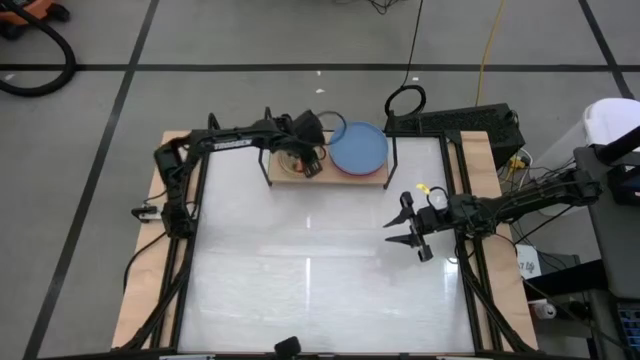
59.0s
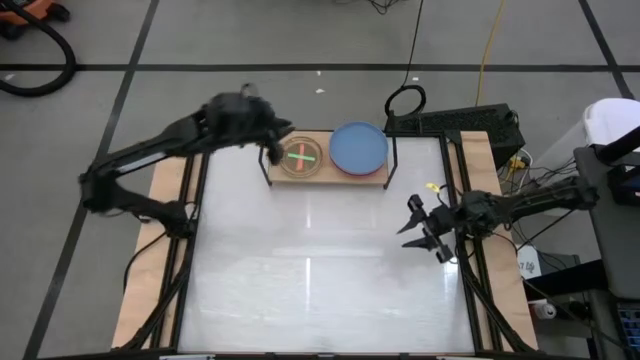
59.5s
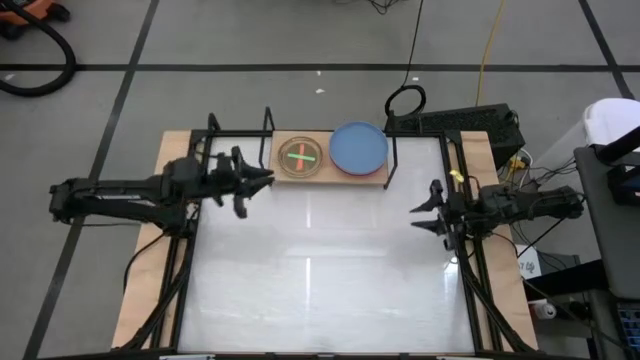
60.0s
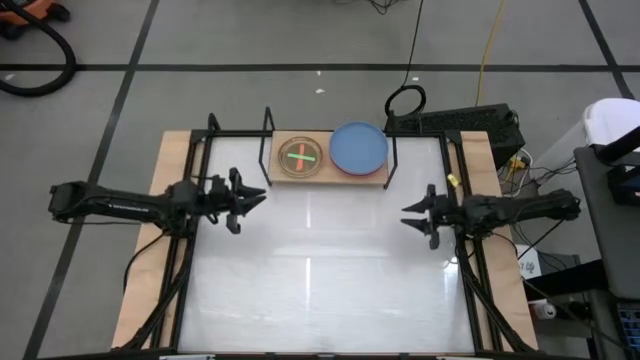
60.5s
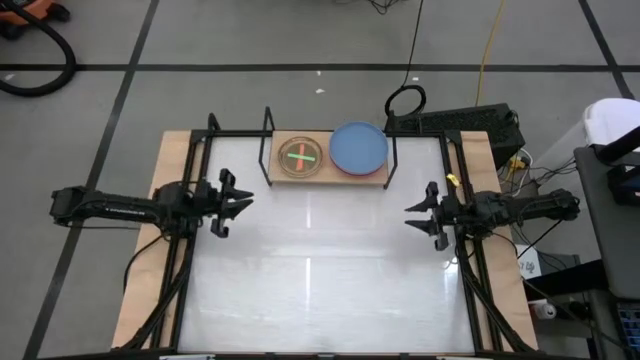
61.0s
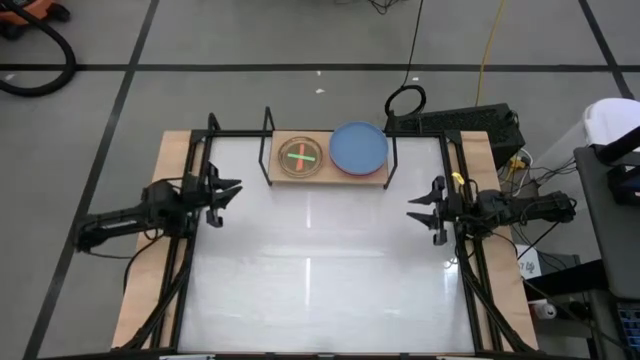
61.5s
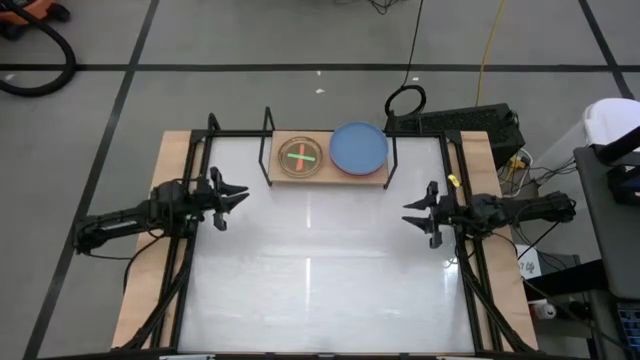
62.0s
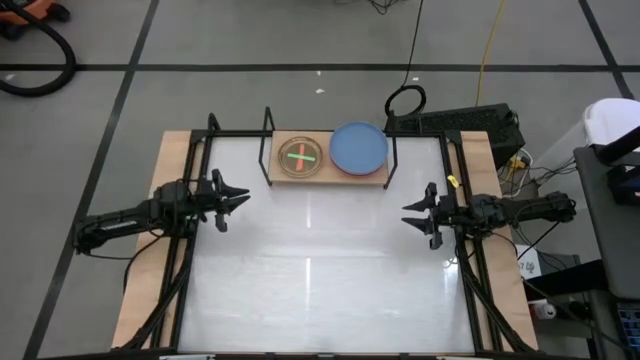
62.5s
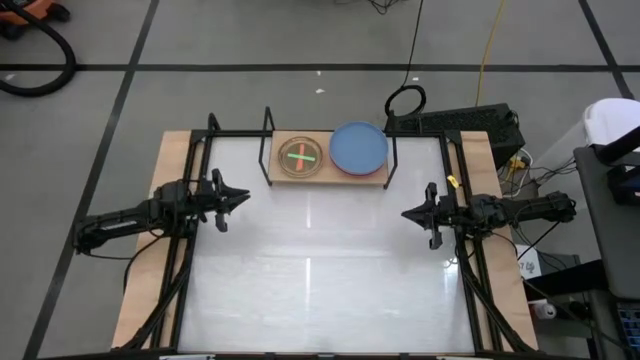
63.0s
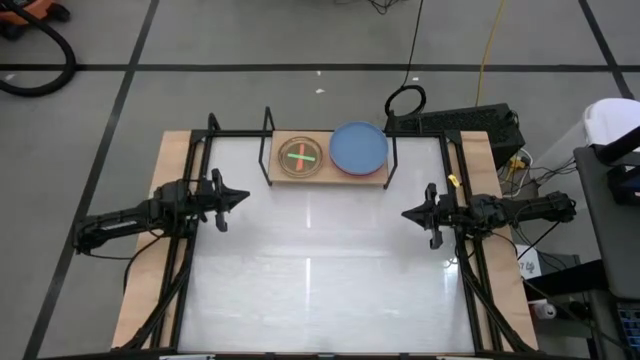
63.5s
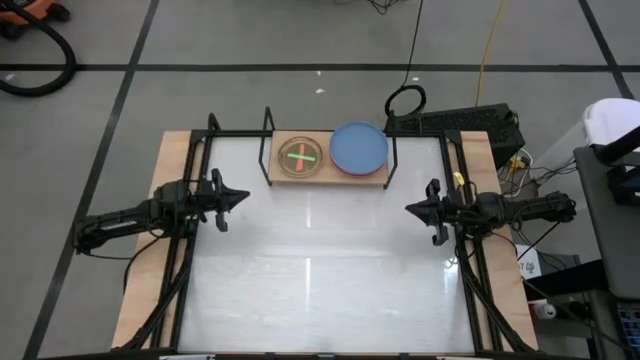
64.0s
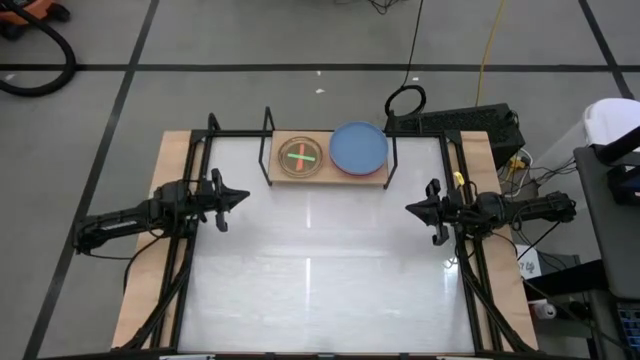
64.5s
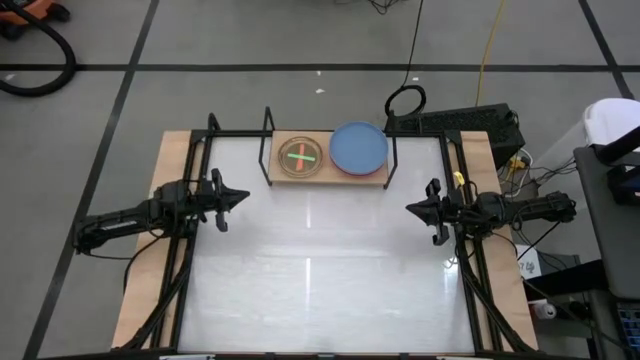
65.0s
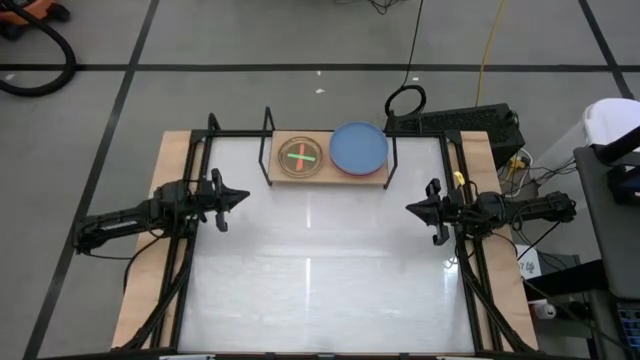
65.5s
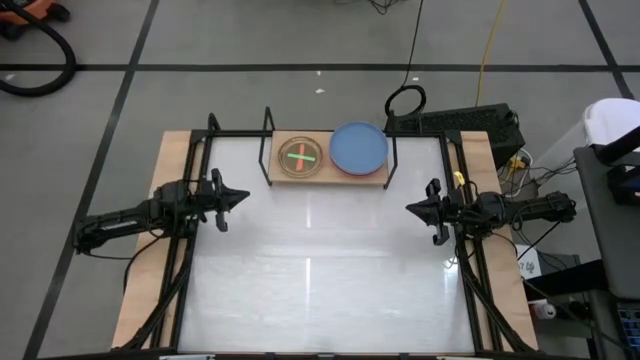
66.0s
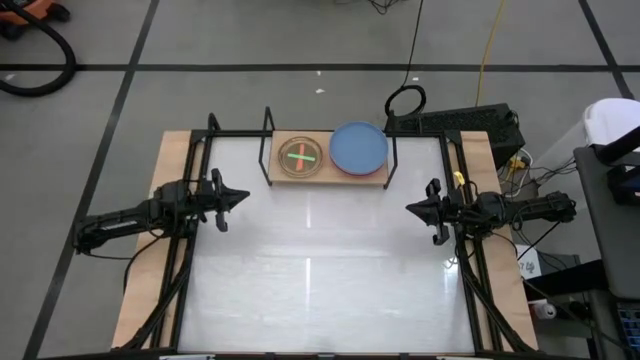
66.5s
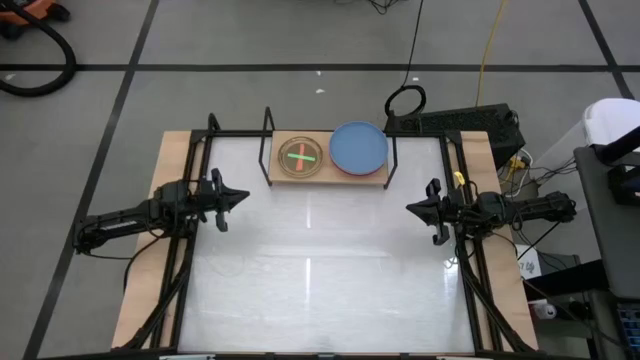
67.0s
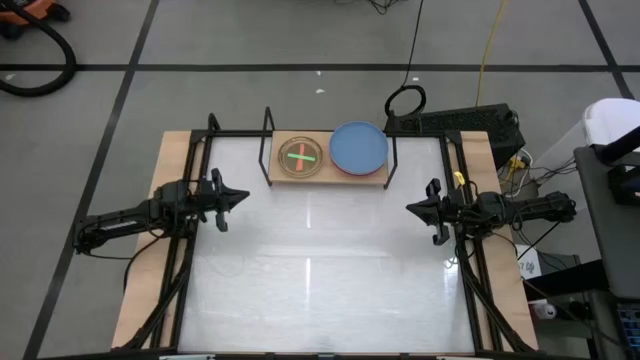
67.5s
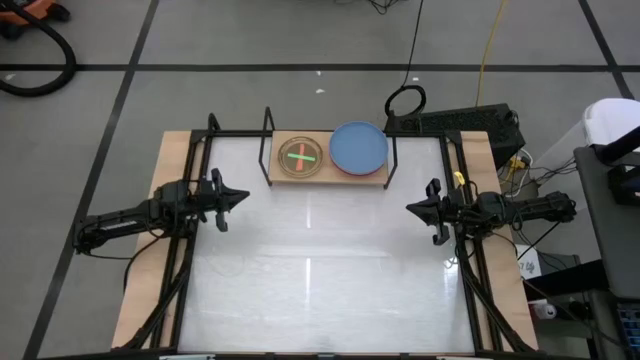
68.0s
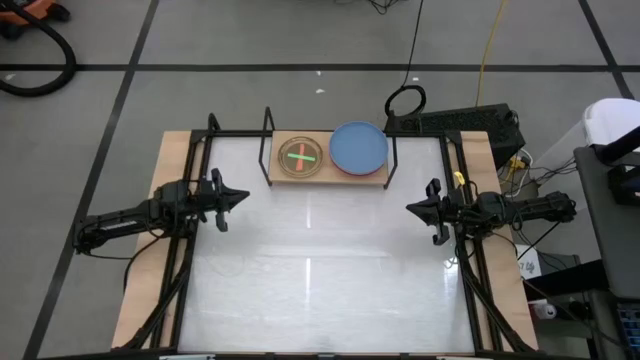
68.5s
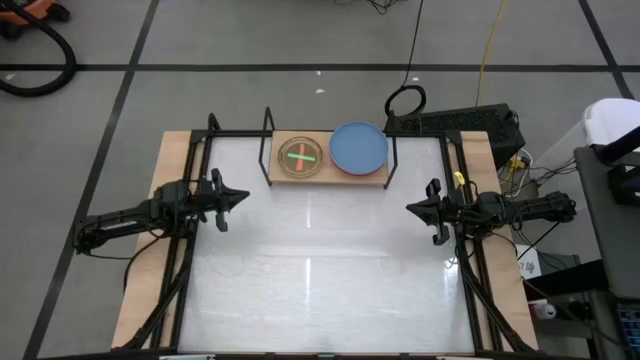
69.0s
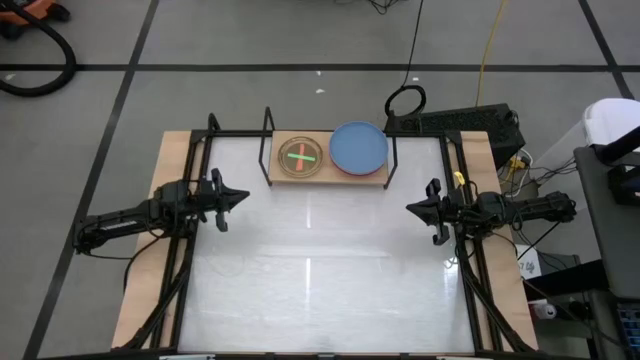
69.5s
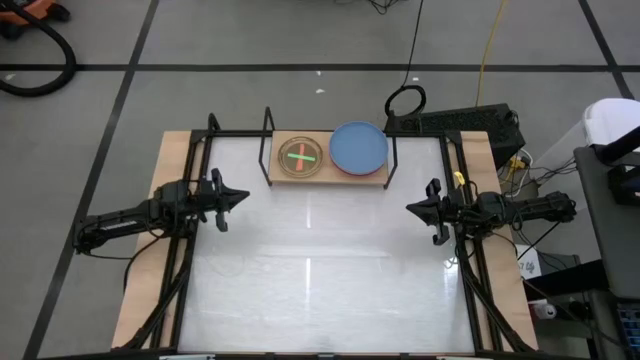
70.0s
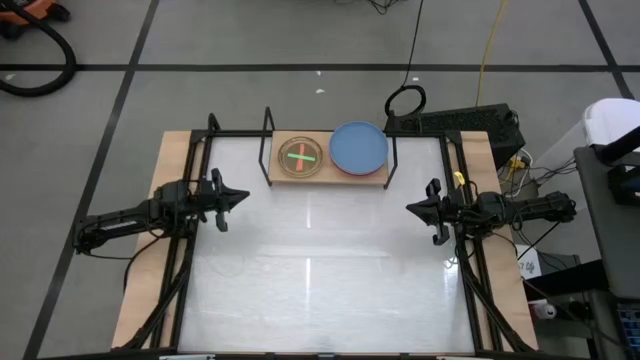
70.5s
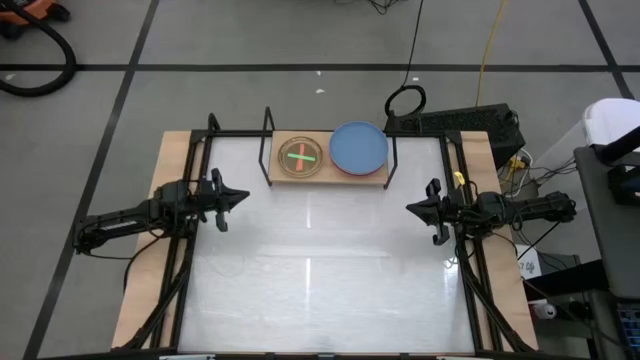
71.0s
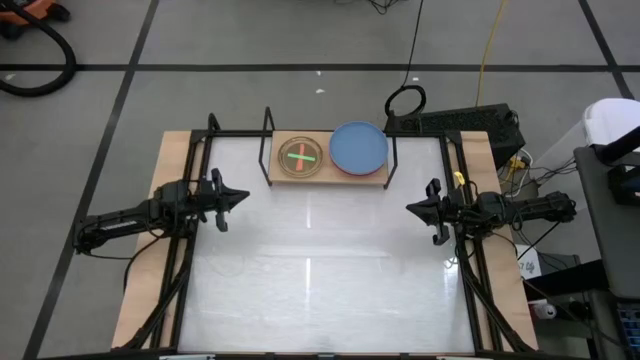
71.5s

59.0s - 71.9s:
Task: Place and stack plates onto a shelf
Return to Home Position

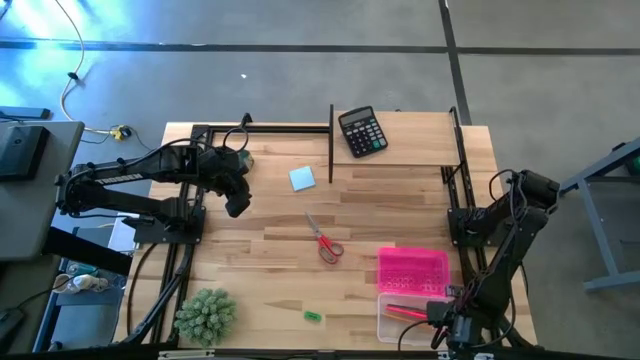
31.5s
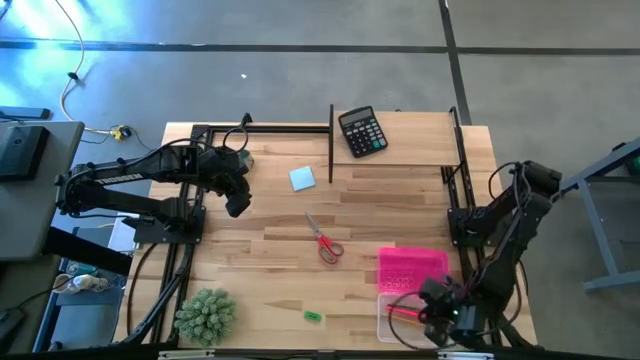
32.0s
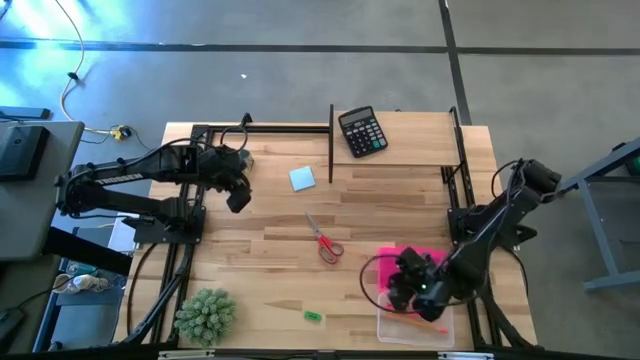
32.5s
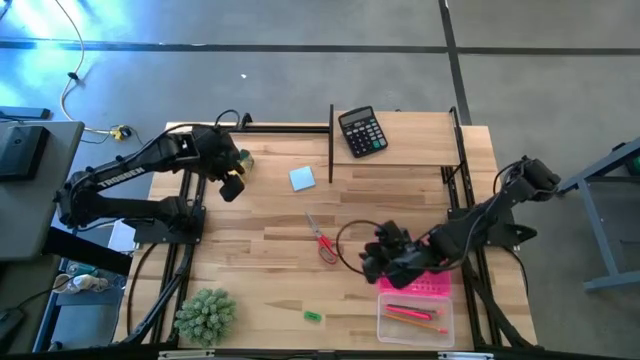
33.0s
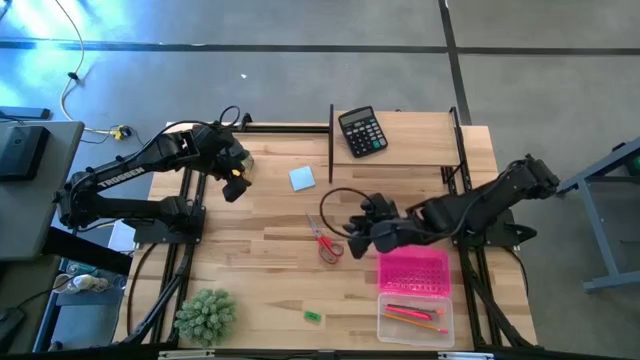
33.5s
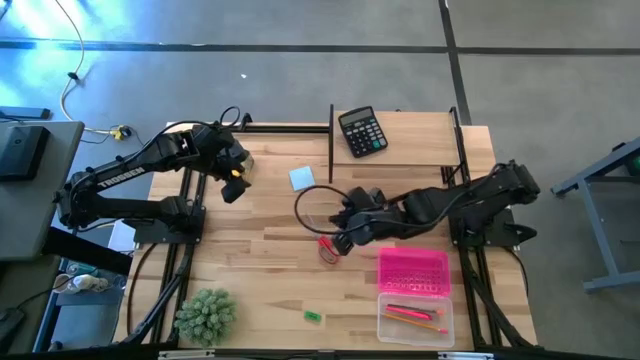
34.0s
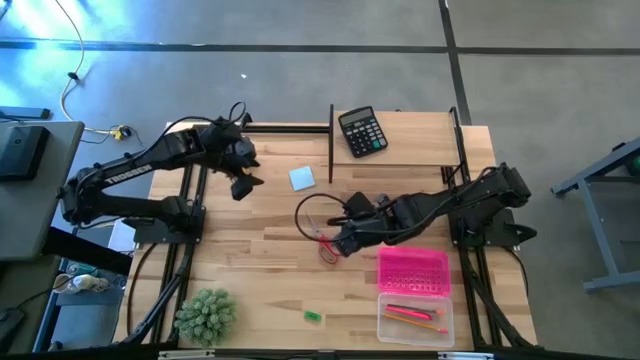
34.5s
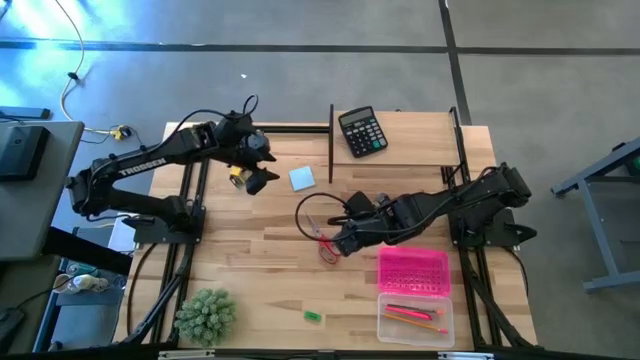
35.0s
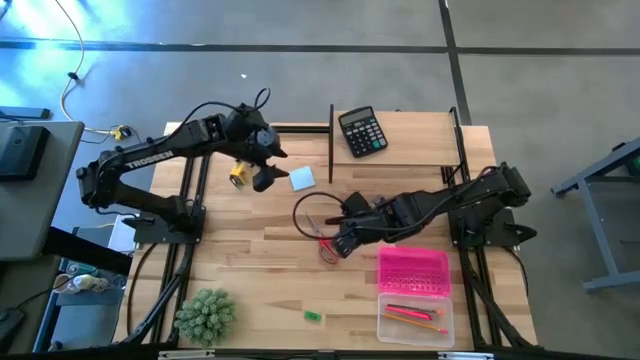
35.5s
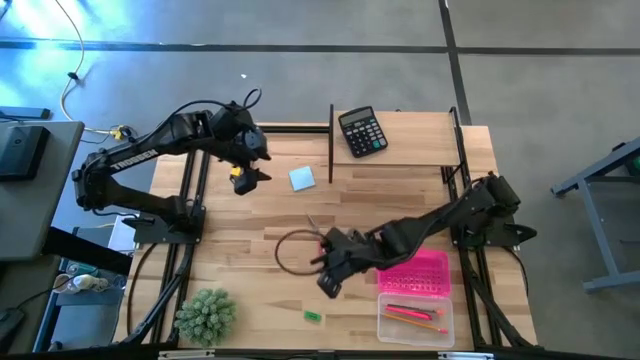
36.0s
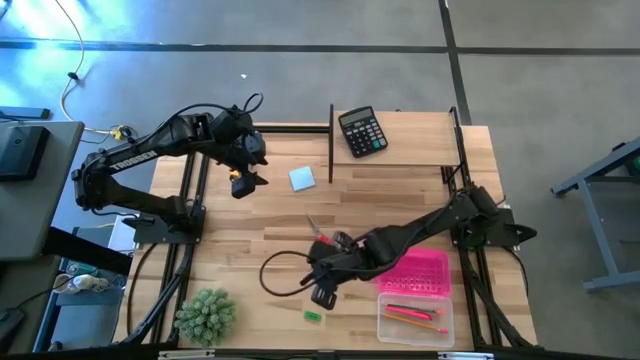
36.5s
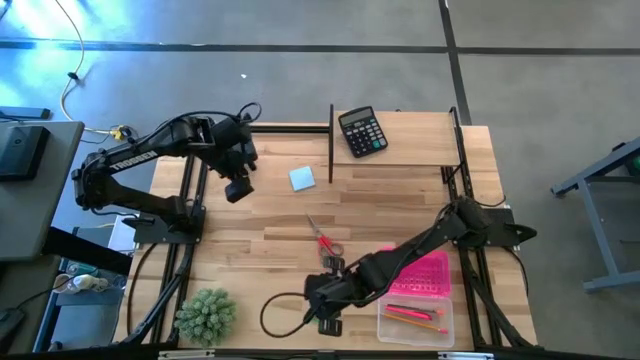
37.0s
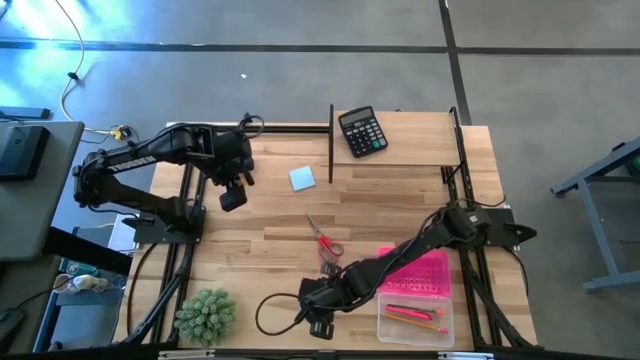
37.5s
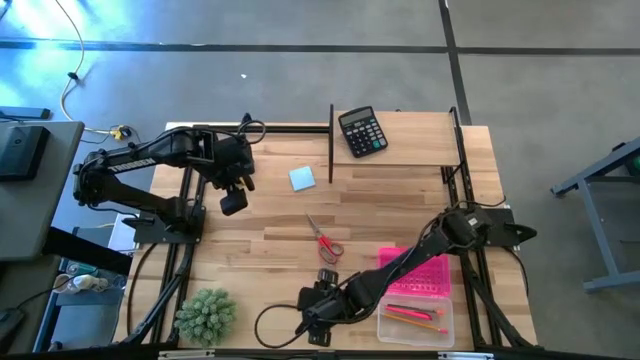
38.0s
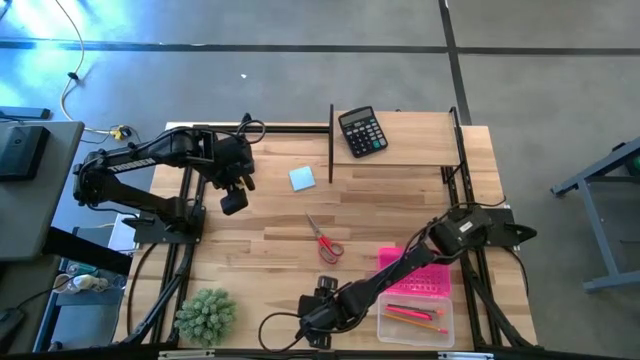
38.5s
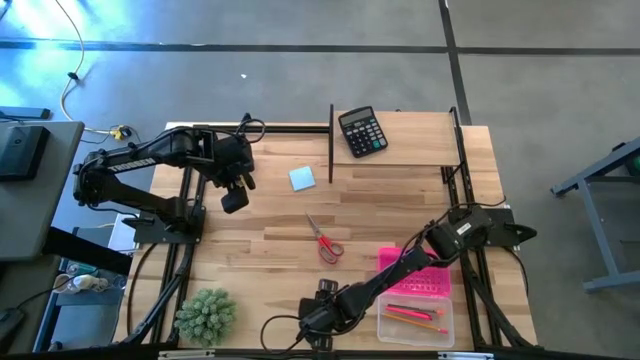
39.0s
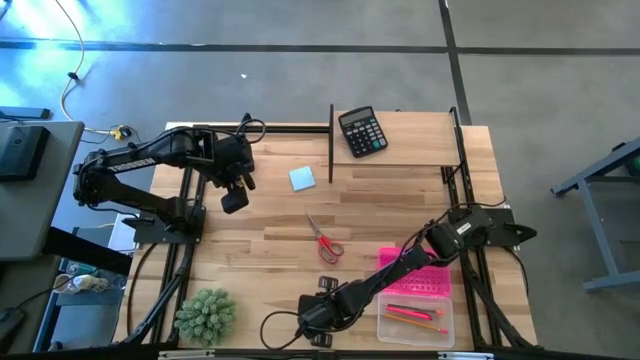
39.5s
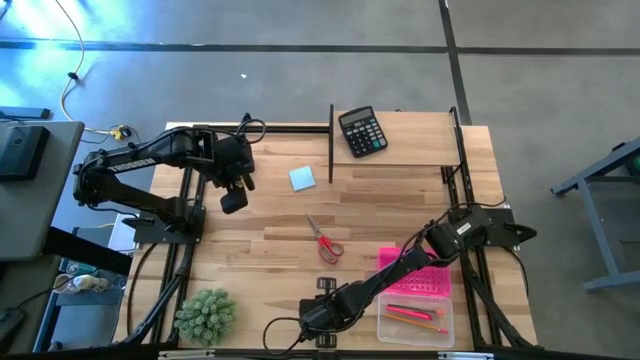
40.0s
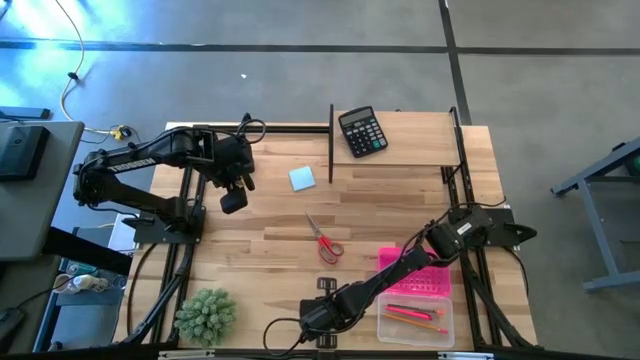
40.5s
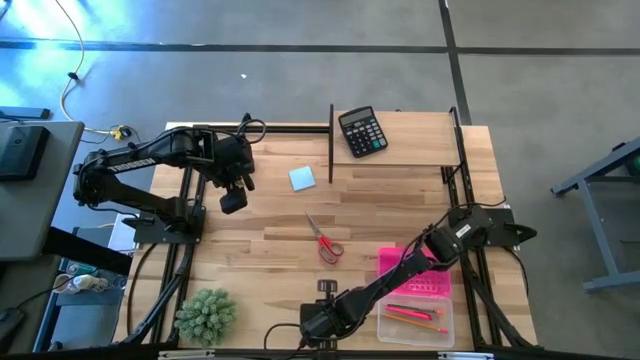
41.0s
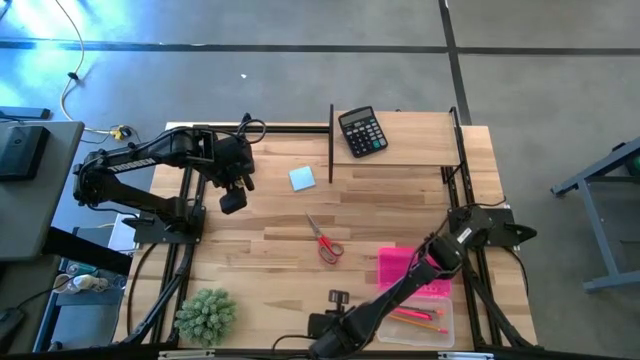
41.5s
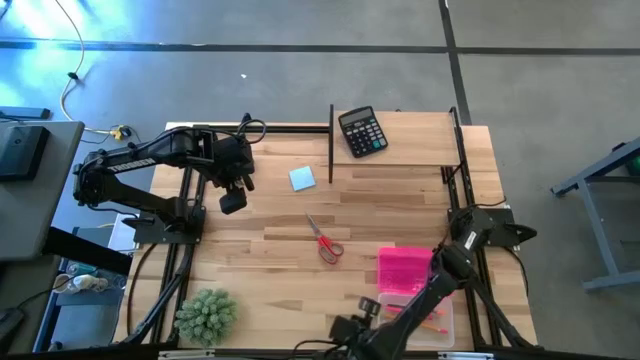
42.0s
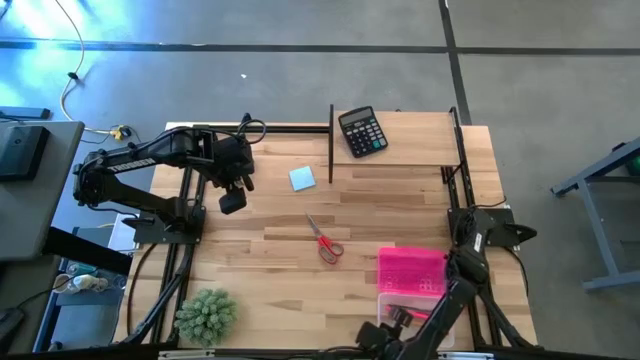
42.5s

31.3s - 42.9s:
Task: Pack school essentials
Put the green eraser into the supply box
